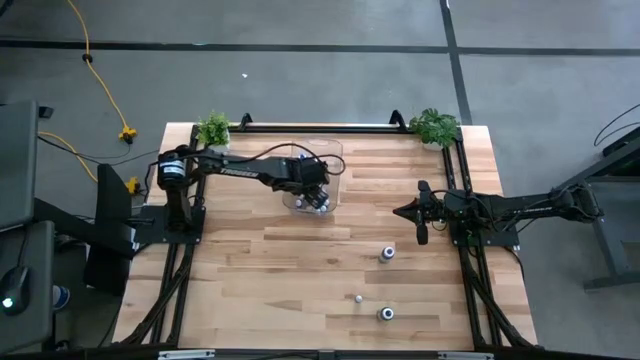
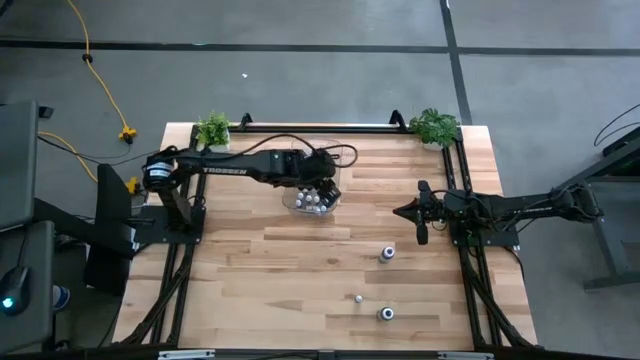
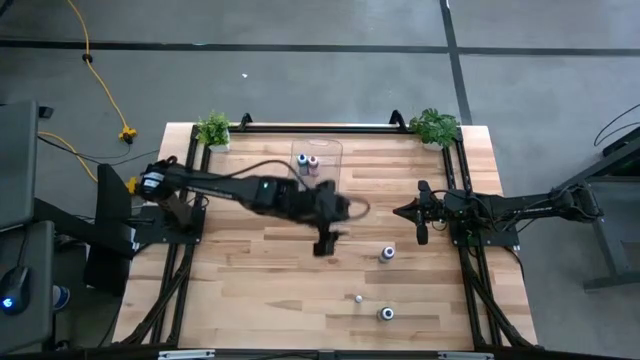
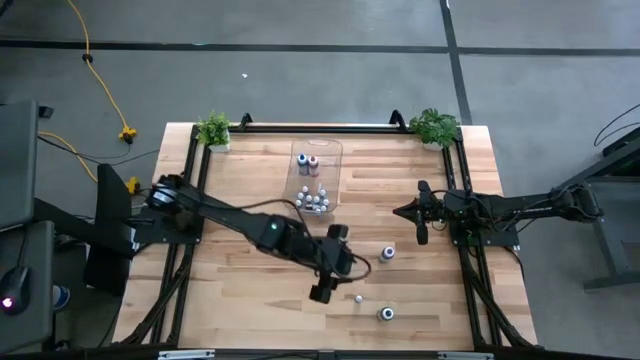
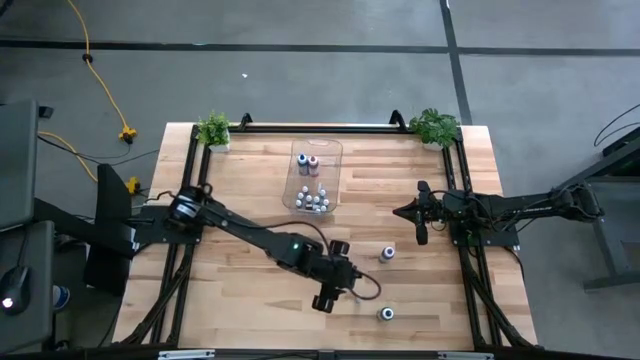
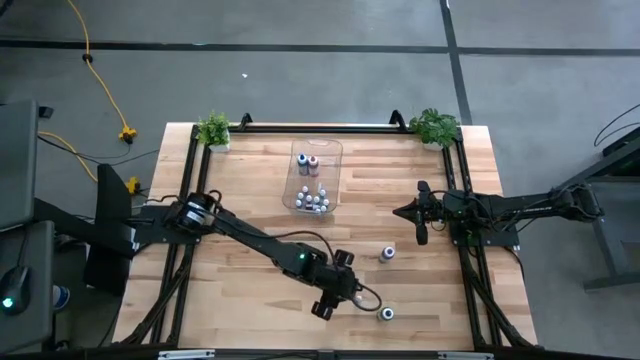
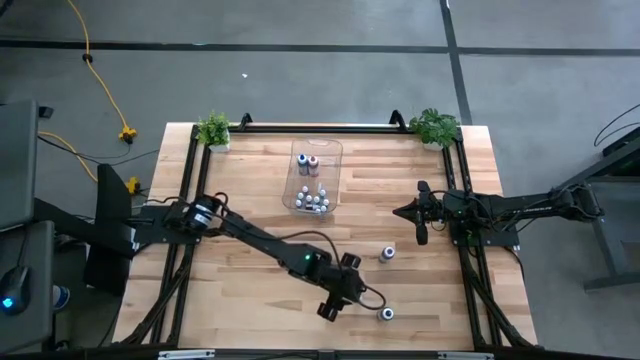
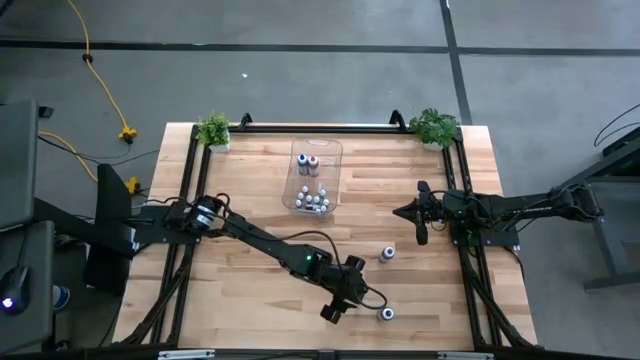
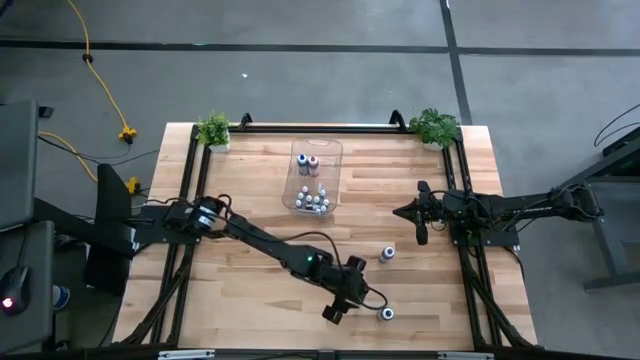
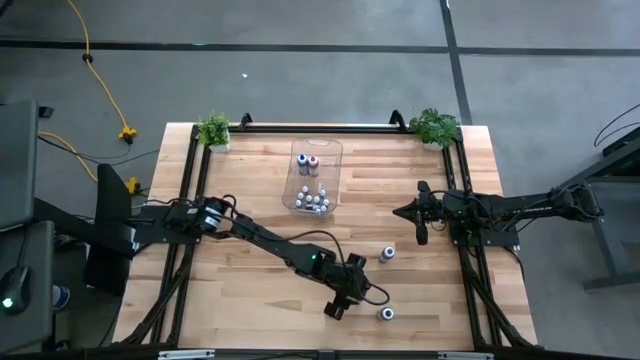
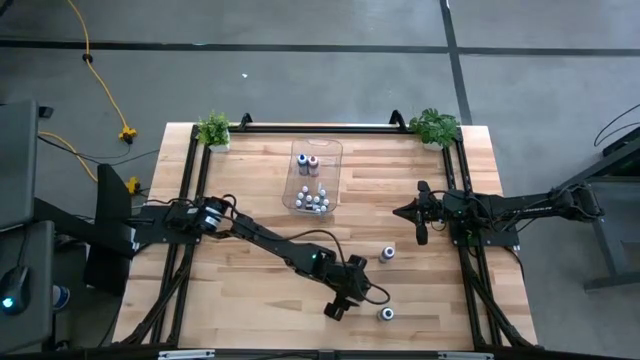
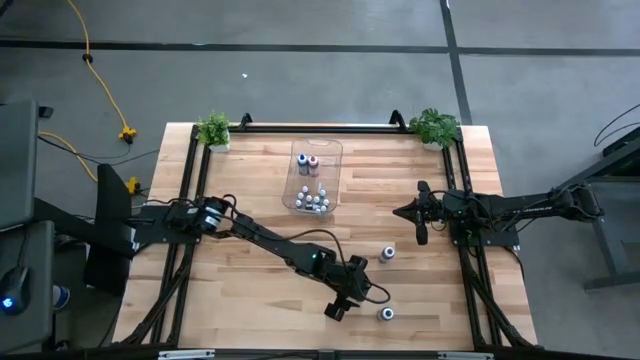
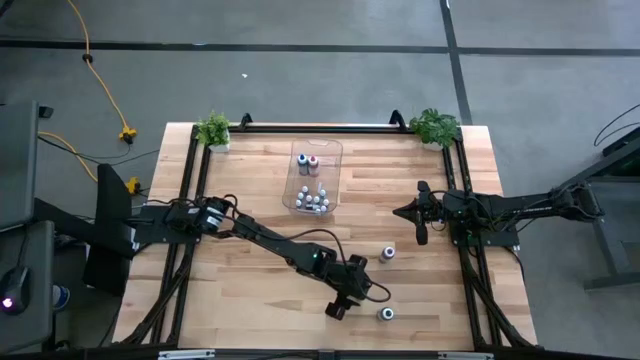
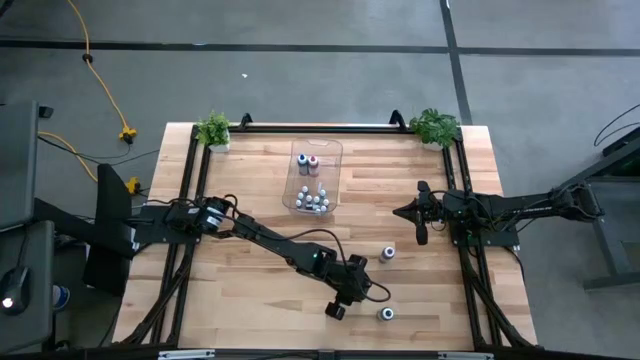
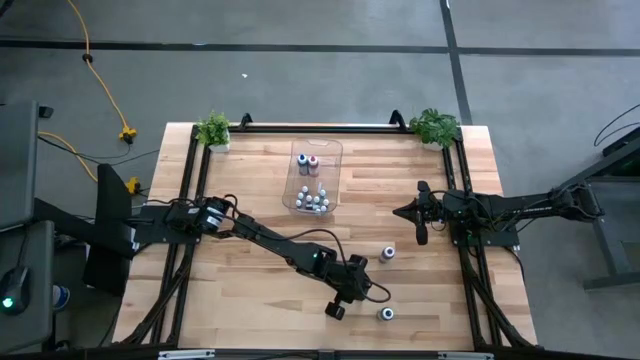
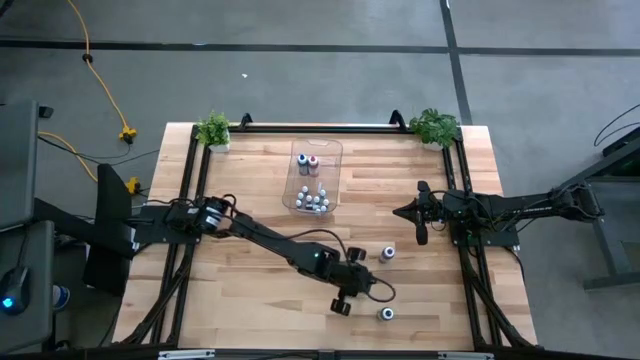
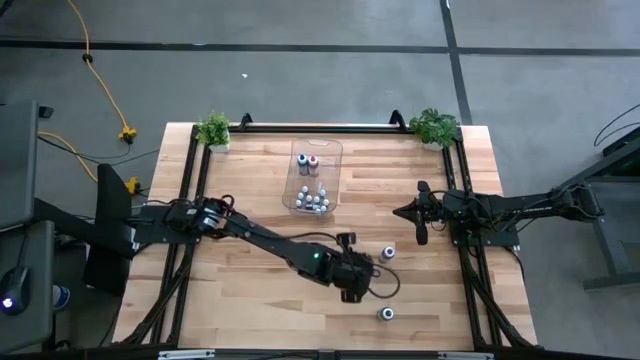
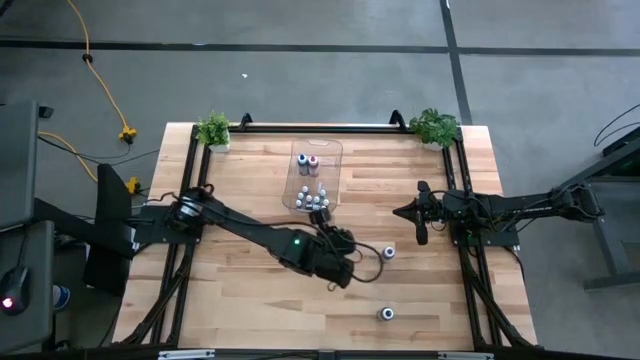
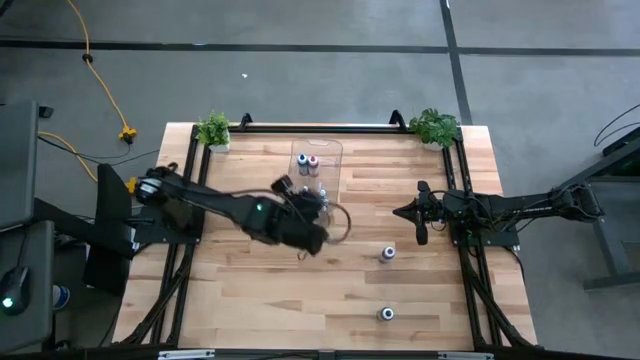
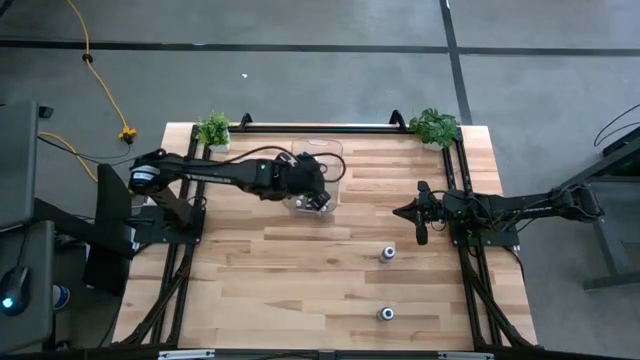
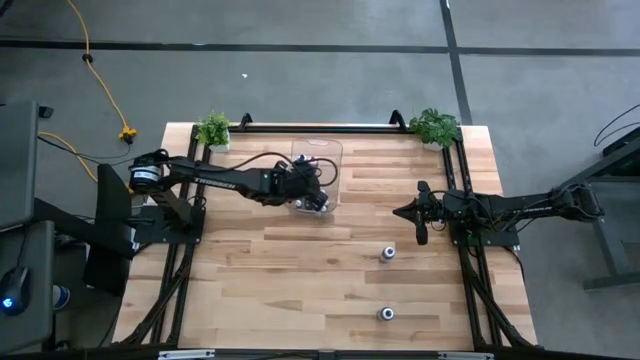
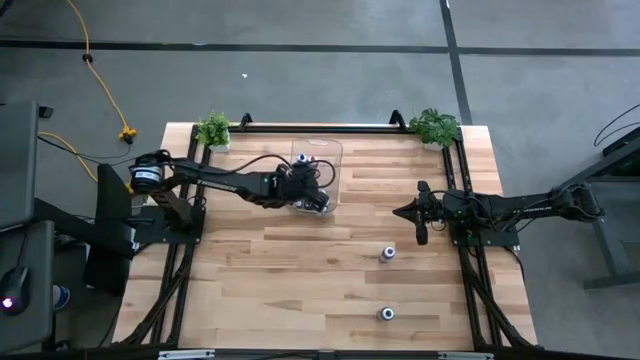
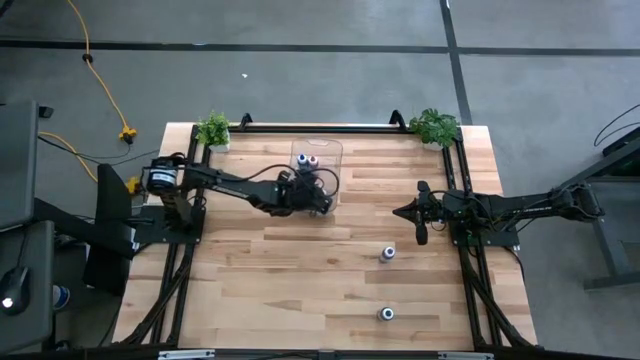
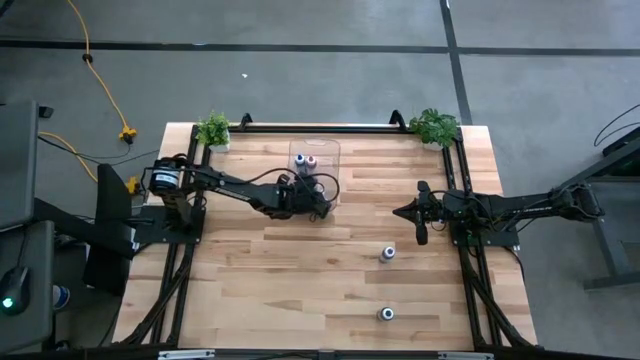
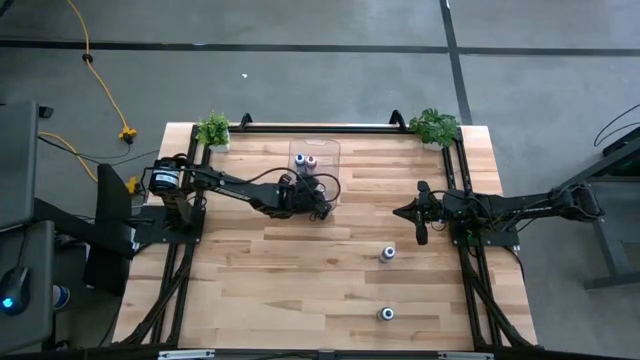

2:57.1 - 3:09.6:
Task: Pick & Place food coloring
Put the small orange food coloring into the transparent bin

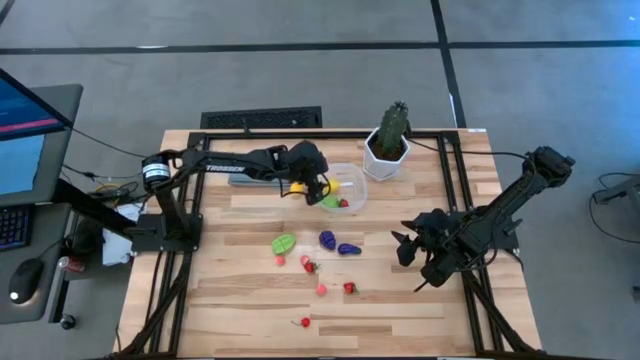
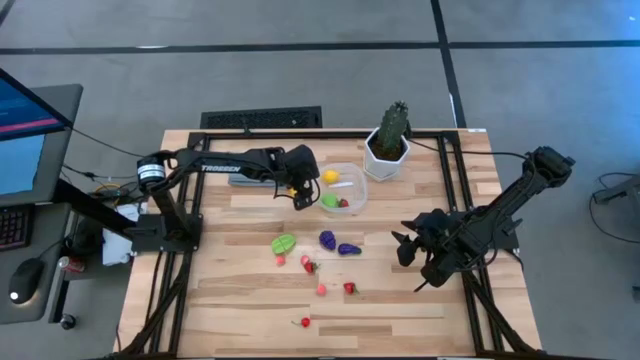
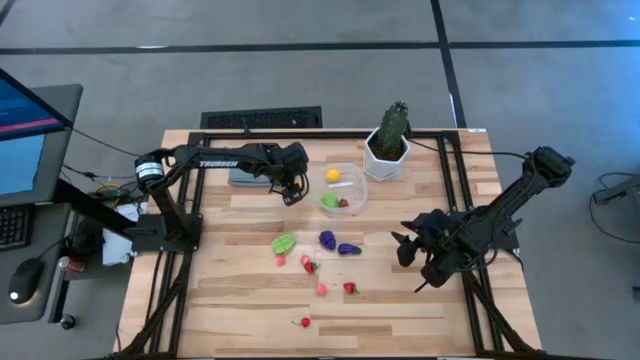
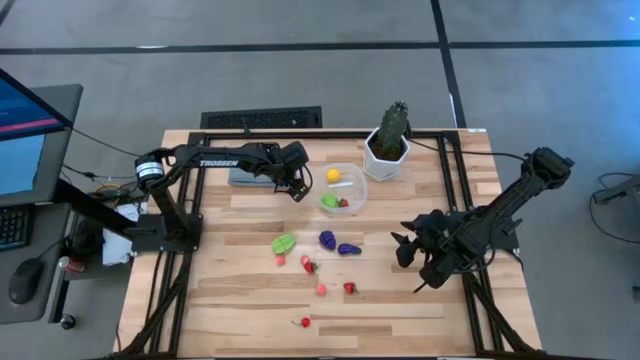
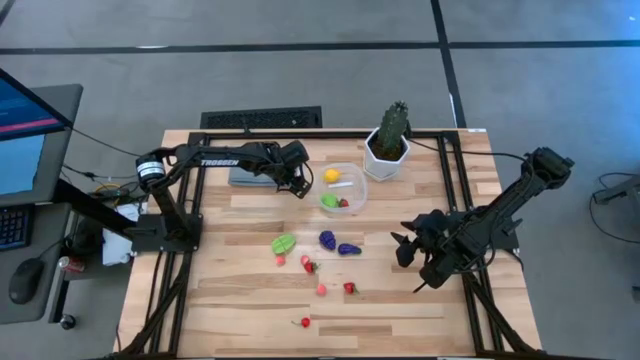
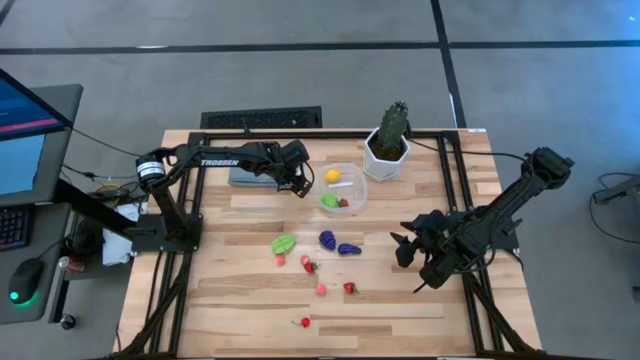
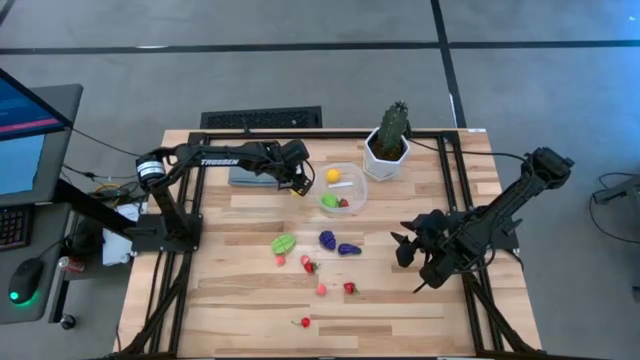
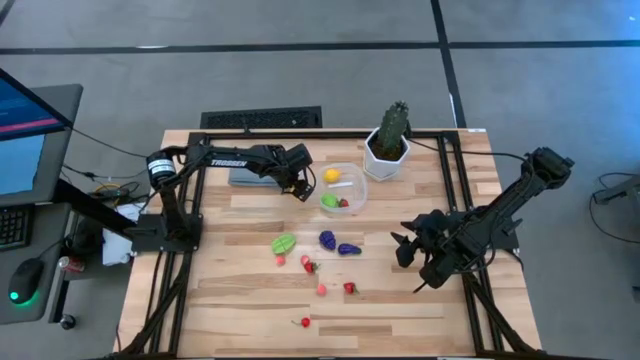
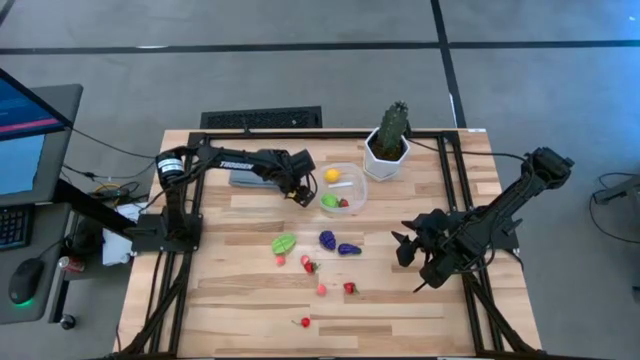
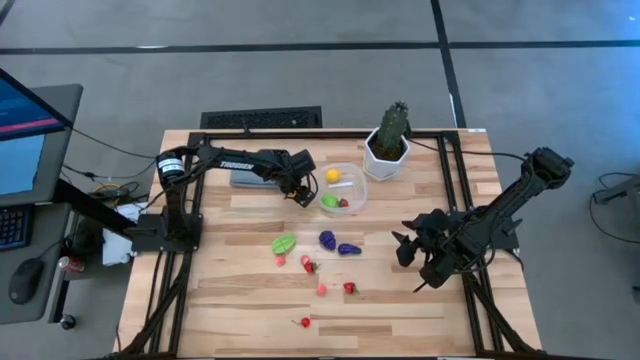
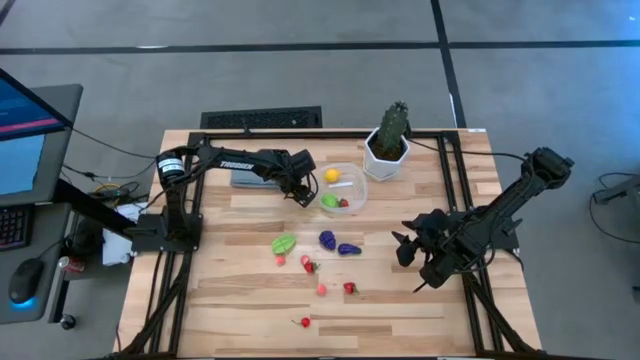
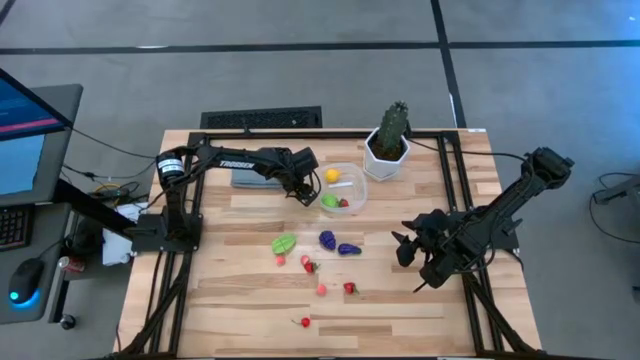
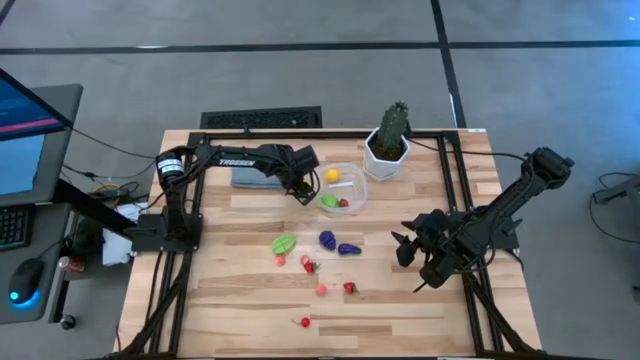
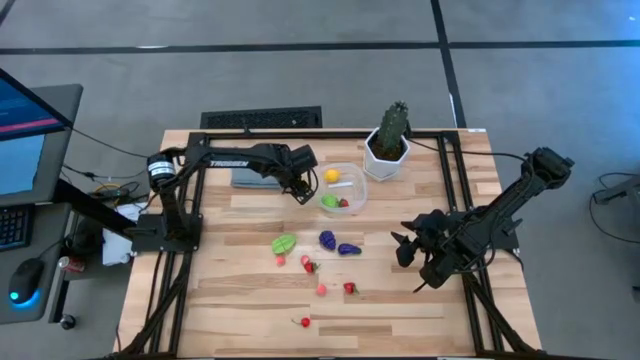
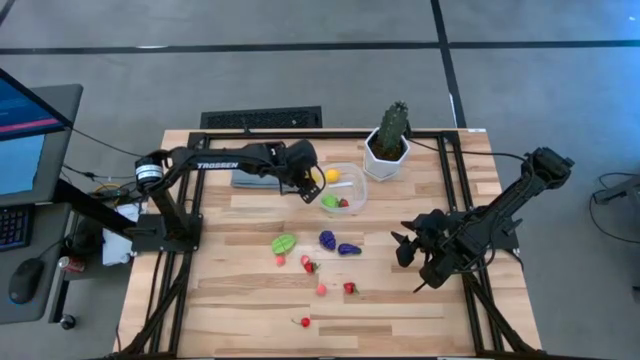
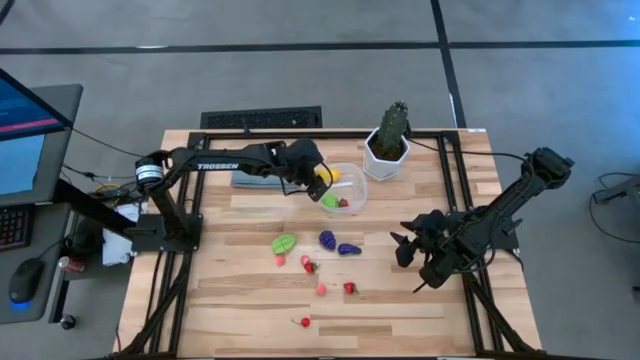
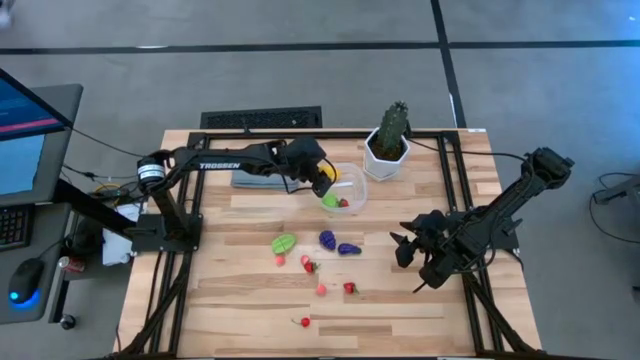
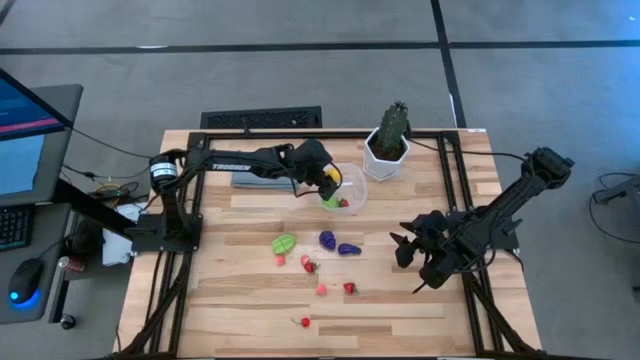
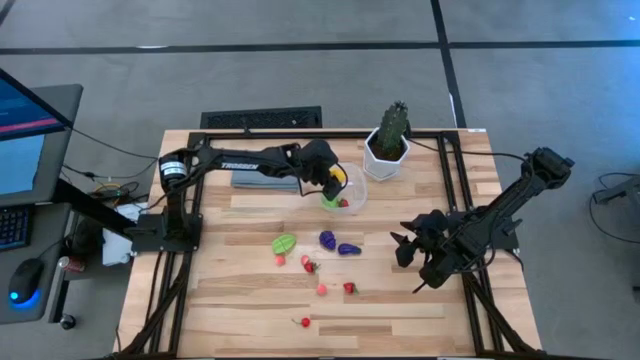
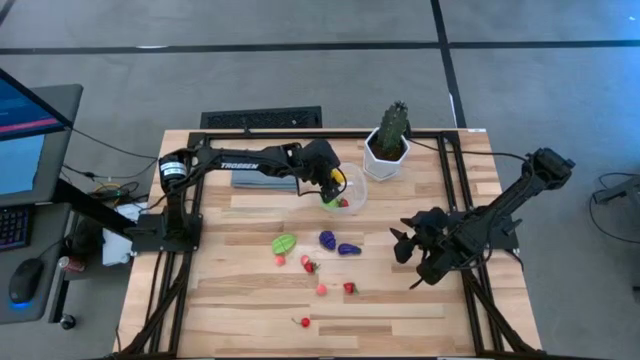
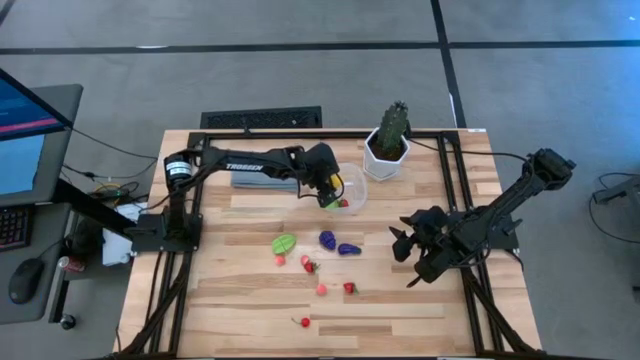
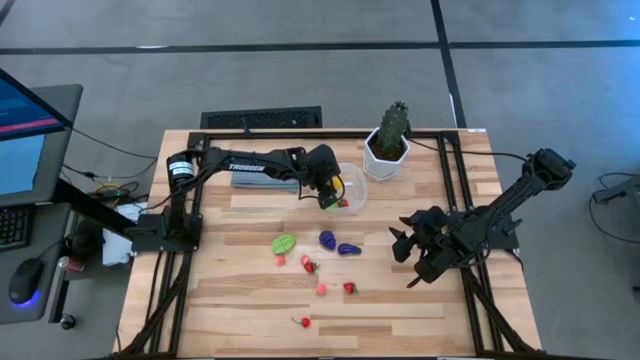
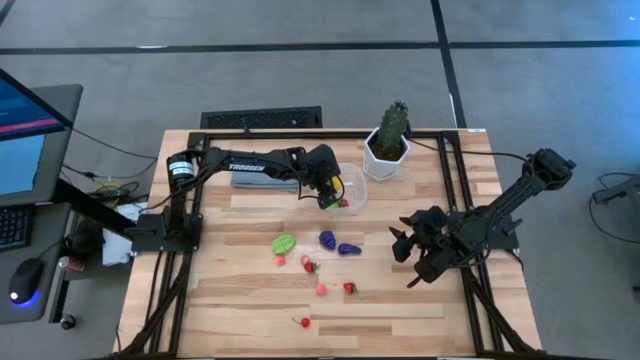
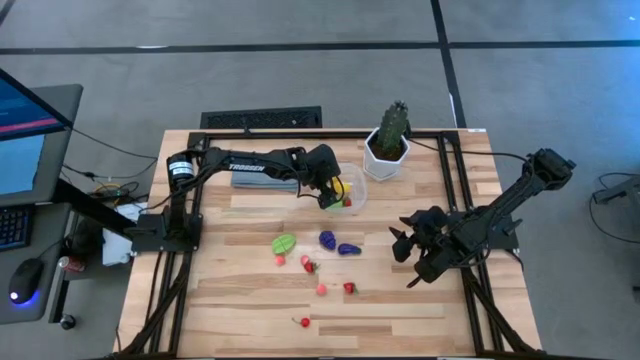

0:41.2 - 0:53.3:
Task: Pick and placing Produce into tupperware
Put the lemon into the transparent bin
